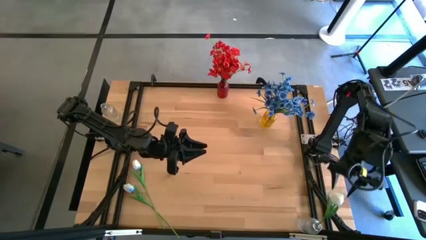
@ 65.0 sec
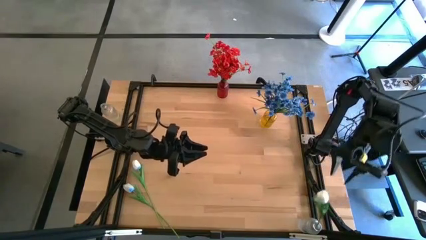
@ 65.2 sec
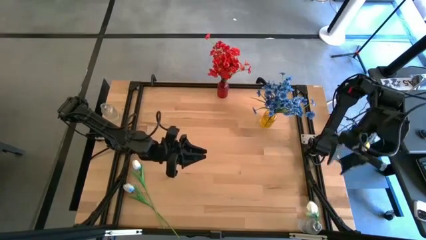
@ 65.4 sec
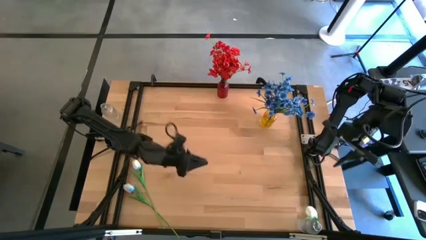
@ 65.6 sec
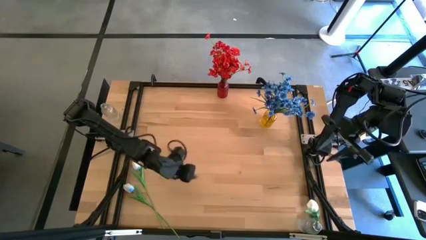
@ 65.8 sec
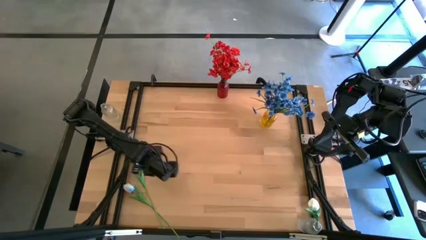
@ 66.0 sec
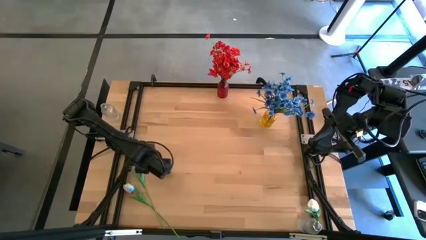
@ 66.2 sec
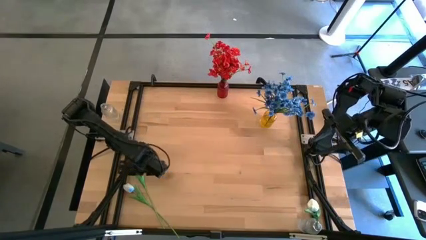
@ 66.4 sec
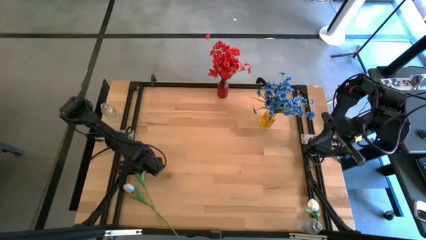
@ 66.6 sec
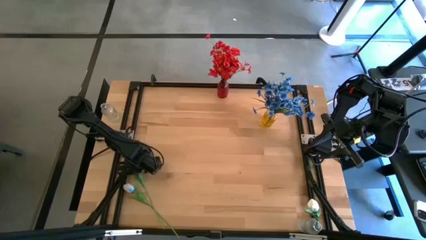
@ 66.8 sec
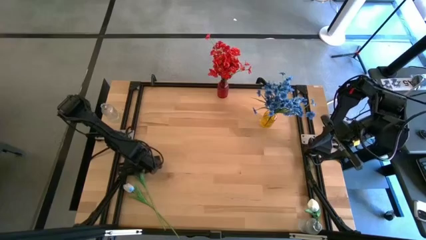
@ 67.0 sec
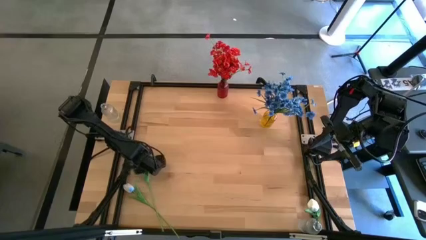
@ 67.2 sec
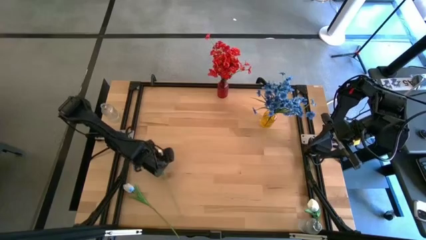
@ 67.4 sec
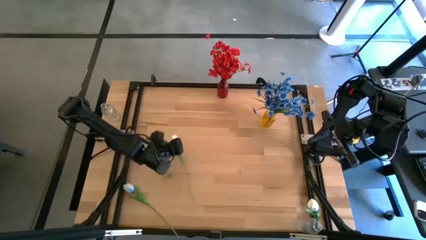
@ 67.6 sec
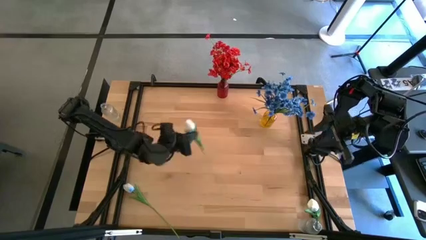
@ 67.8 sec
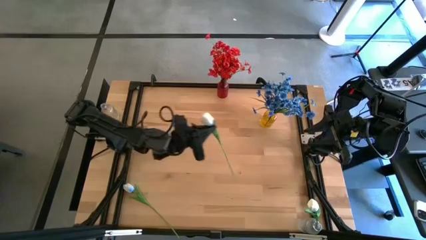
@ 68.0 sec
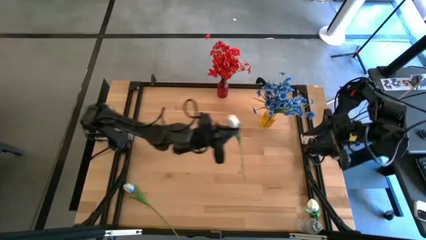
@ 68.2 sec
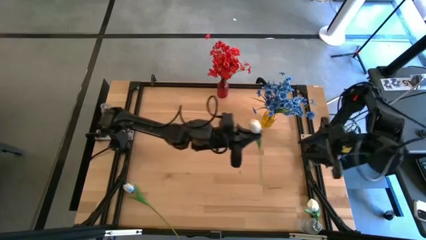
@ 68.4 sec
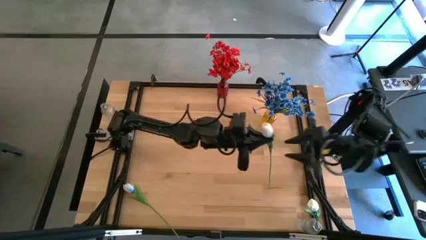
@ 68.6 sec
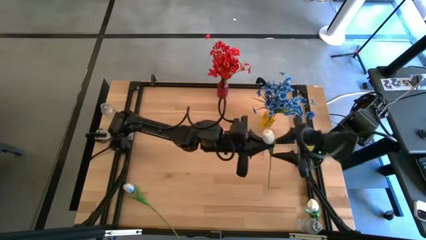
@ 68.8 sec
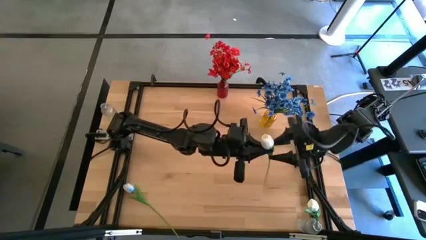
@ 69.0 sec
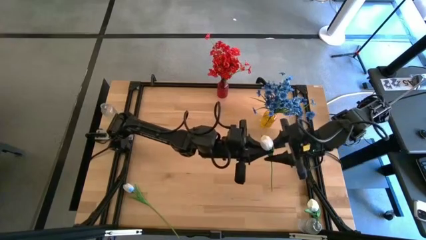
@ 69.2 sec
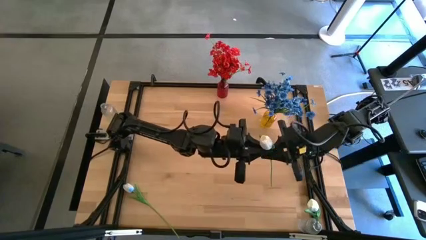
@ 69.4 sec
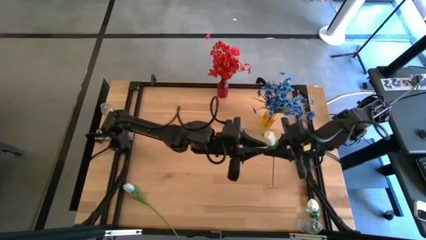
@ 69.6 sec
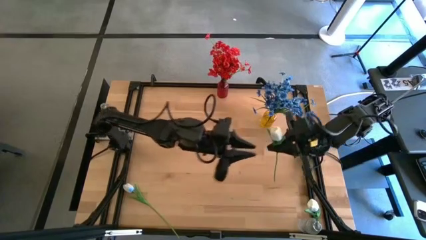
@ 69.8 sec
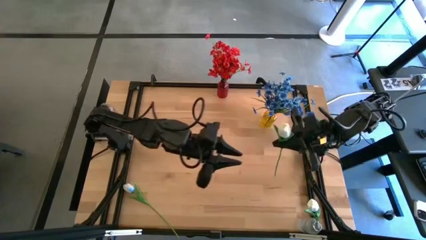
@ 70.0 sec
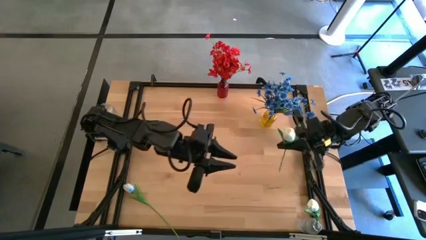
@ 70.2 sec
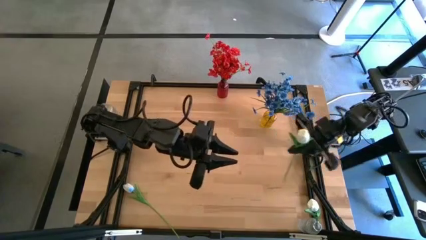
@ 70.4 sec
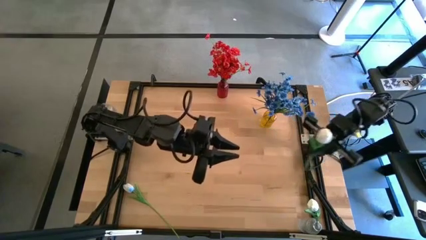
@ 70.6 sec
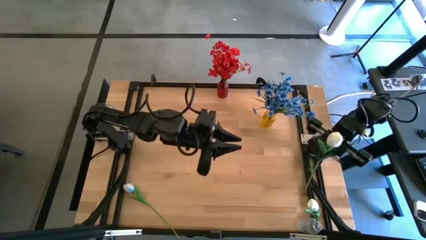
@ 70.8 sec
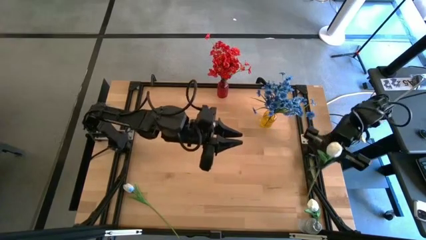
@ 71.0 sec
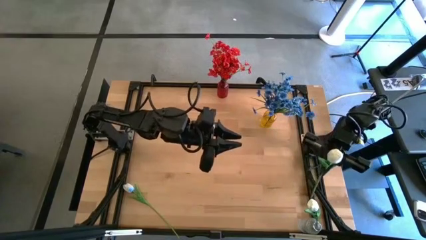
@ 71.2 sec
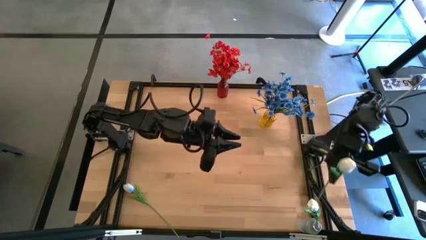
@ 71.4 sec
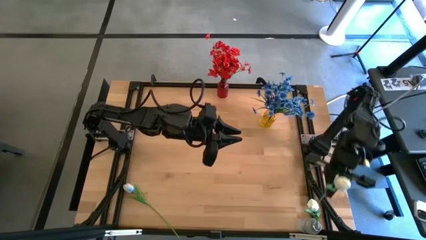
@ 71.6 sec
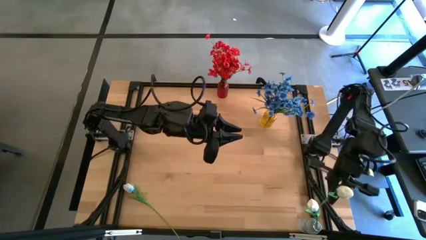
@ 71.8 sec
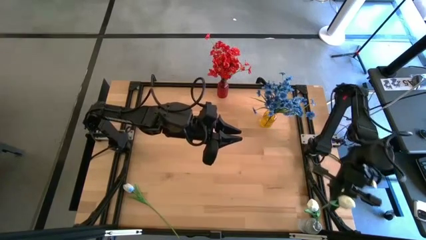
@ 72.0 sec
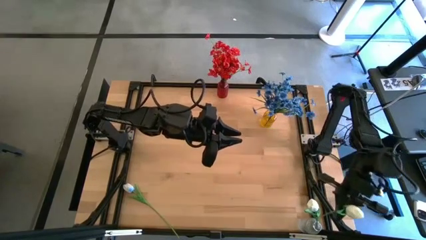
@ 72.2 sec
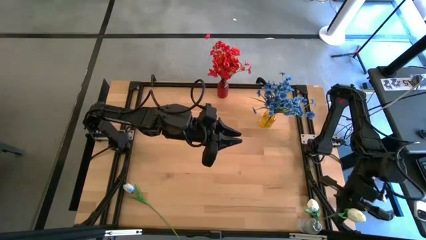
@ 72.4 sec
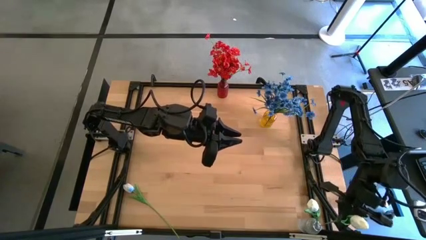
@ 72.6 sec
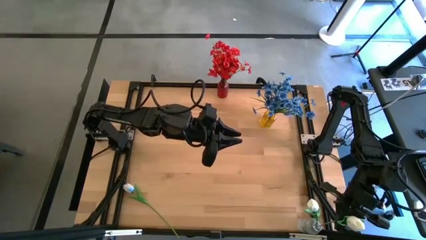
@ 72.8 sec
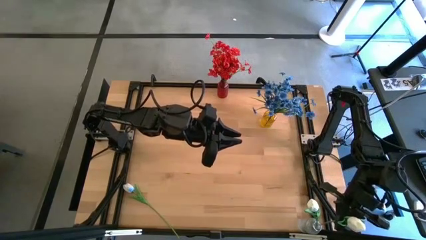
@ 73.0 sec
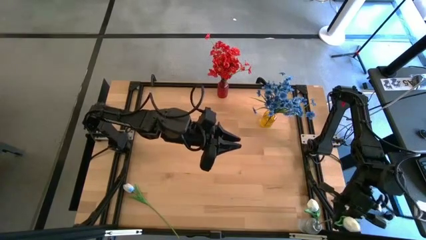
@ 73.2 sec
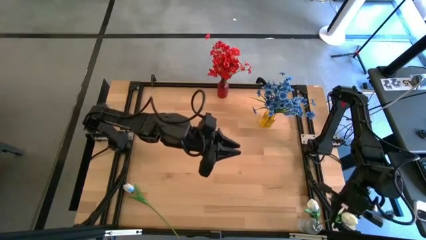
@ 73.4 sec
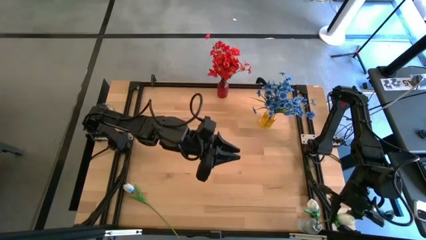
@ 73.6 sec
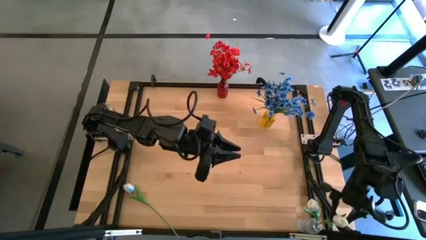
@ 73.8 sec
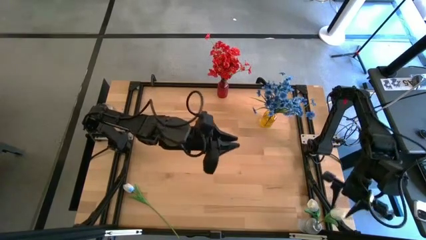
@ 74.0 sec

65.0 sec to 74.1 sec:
Task: Sort flowers into vase by color
Put the top white tulip into the transparent vase

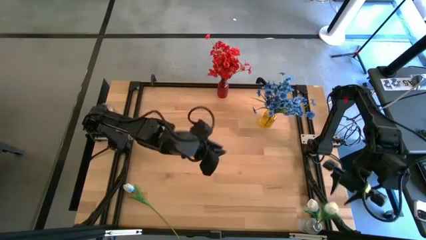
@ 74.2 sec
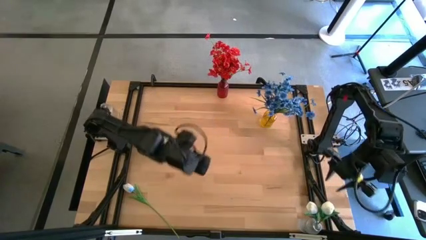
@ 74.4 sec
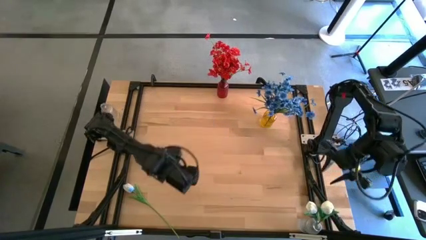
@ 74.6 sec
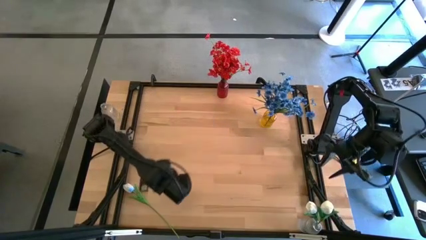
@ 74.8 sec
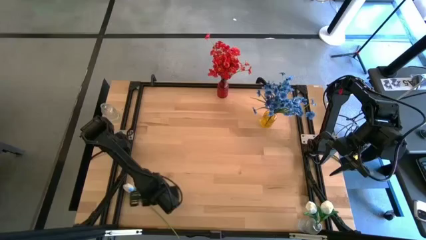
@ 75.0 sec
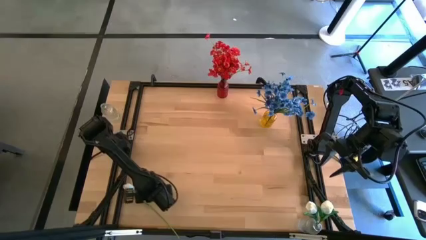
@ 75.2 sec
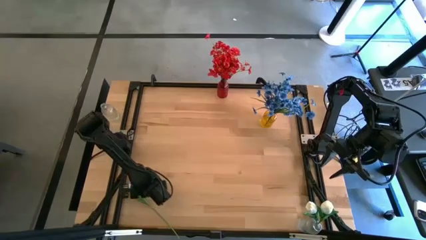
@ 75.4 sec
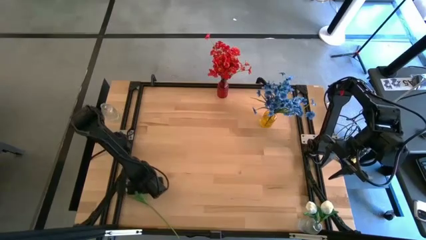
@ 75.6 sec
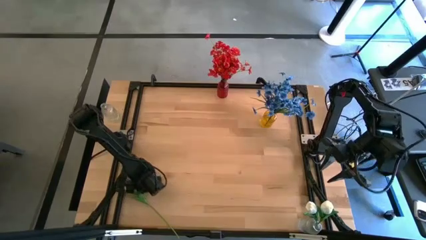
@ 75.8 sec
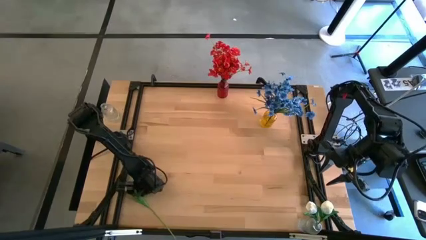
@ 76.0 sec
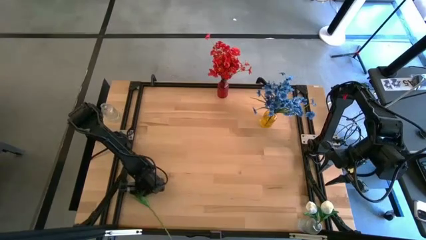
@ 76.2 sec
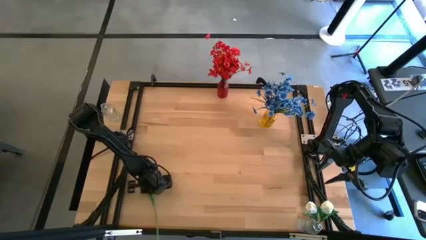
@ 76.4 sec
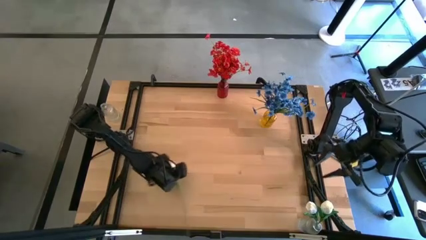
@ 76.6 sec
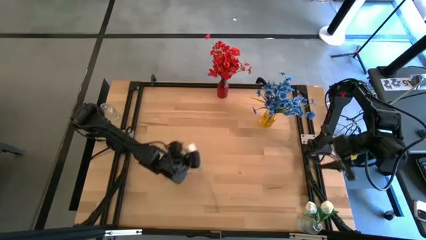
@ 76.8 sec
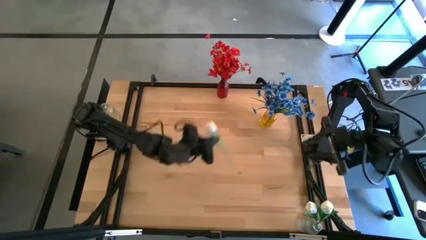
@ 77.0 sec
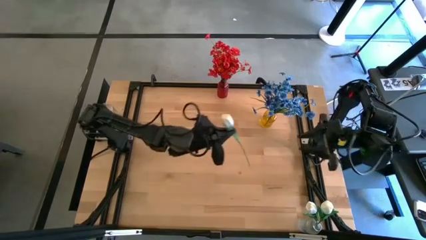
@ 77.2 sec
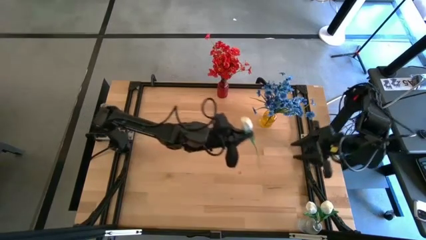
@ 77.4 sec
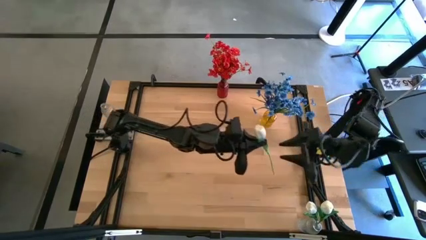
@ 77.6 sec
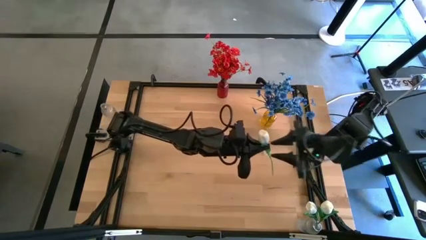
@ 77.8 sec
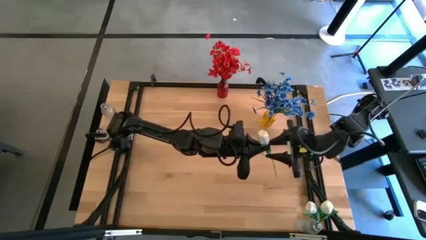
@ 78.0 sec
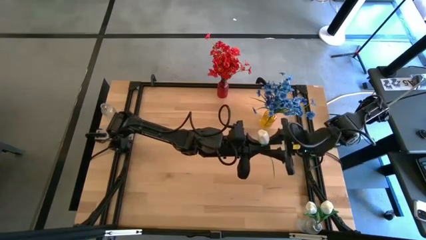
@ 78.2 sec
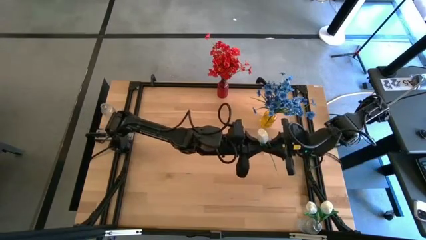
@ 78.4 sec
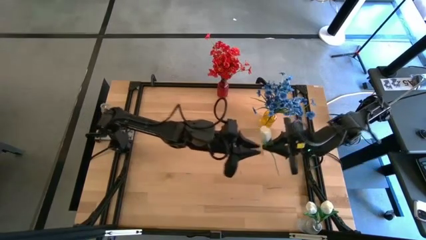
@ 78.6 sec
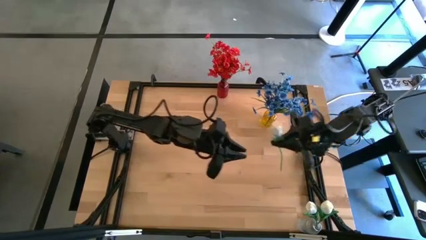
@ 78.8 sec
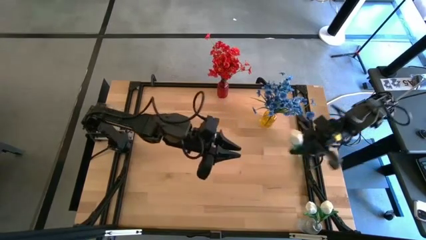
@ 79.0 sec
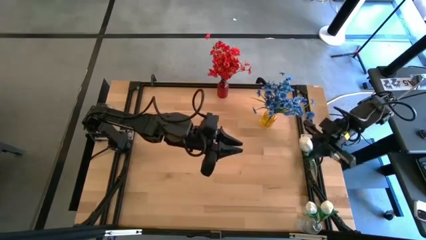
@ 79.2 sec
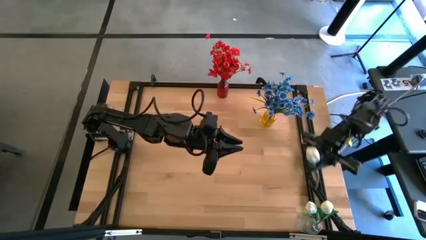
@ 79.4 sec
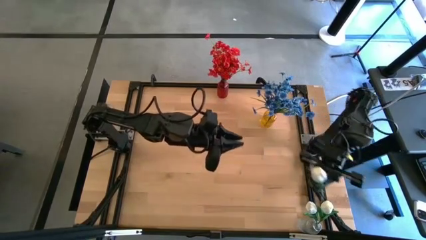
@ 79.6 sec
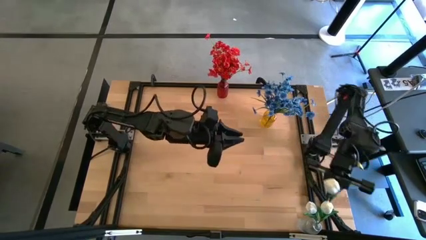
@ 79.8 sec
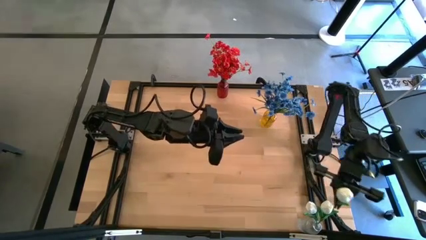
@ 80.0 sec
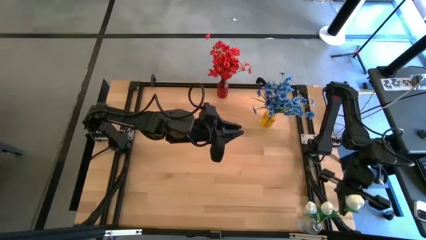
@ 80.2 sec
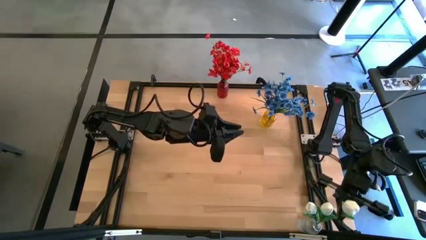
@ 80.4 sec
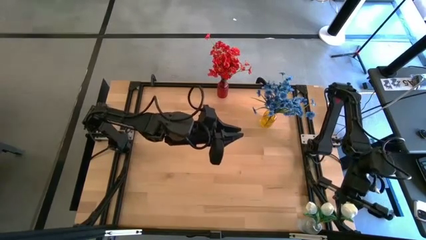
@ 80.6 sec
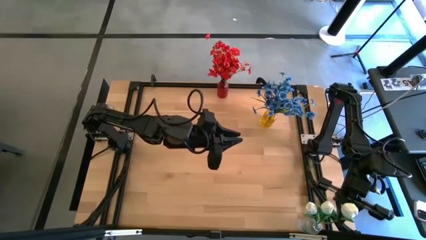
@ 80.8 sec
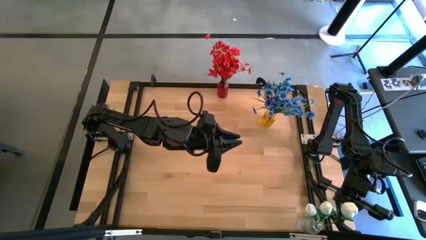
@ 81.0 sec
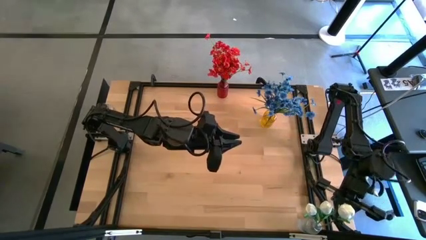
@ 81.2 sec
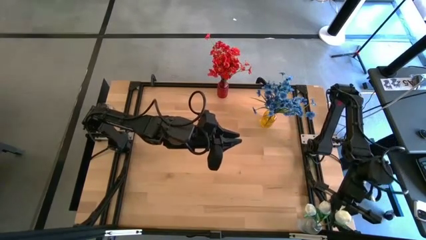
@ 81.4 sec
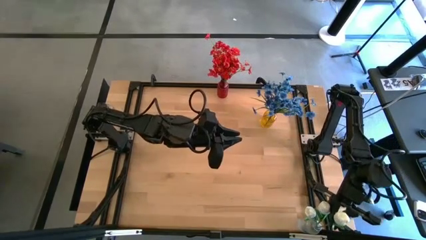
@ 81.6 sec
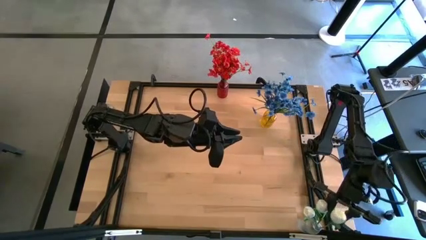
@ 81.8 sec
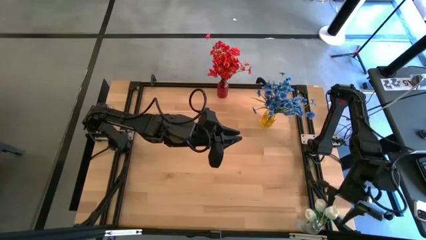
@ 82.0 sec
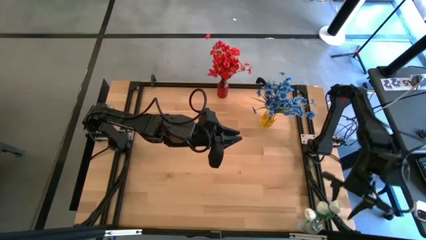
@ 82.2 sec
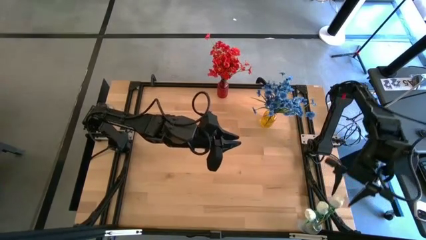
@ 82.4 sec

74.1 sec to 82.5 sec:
Put the white tulip into the transparent vase
